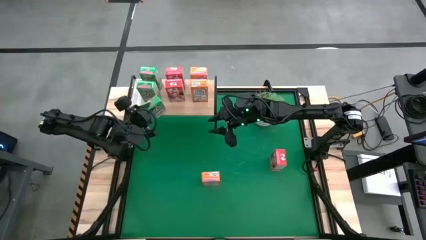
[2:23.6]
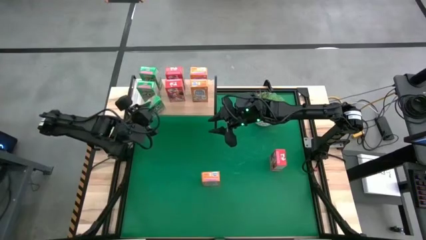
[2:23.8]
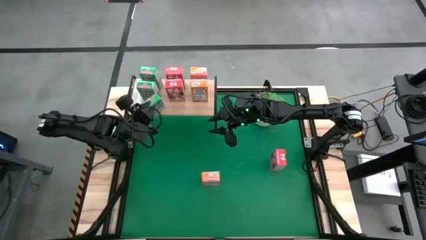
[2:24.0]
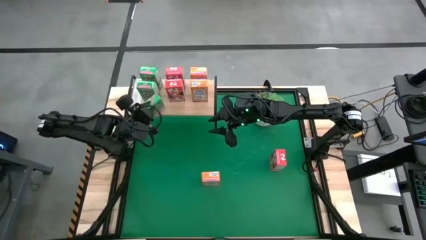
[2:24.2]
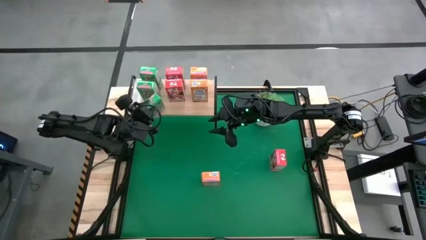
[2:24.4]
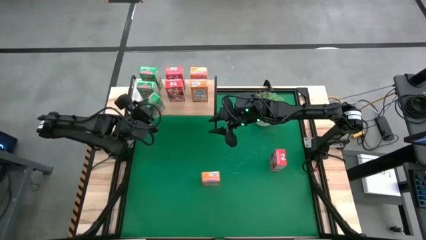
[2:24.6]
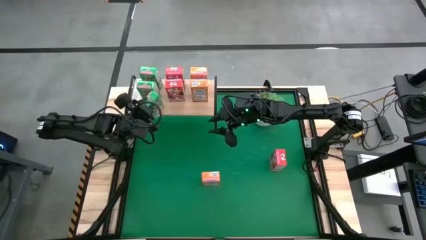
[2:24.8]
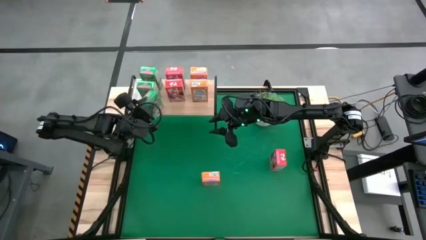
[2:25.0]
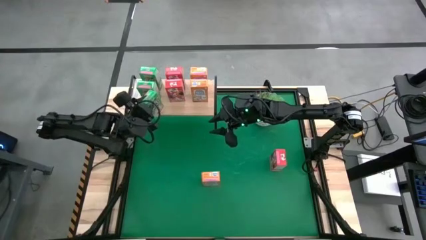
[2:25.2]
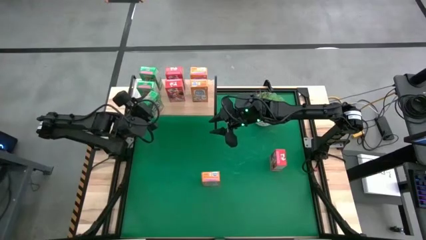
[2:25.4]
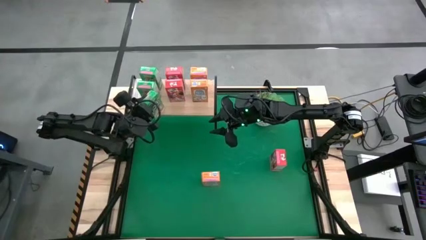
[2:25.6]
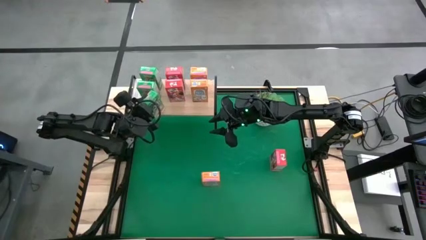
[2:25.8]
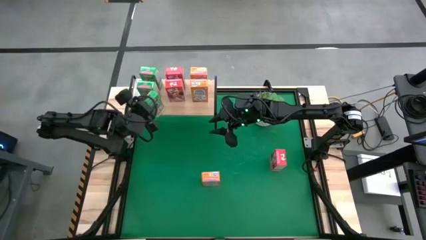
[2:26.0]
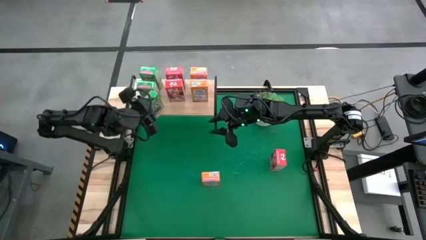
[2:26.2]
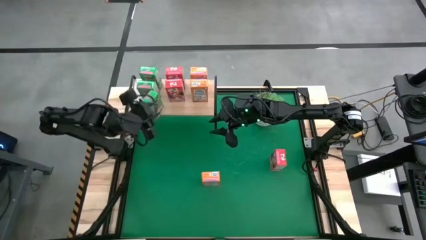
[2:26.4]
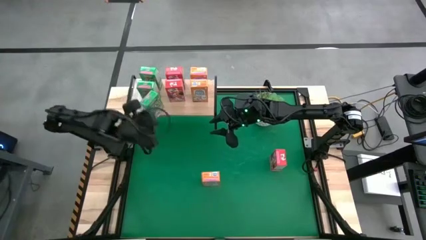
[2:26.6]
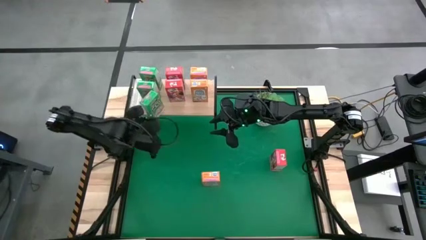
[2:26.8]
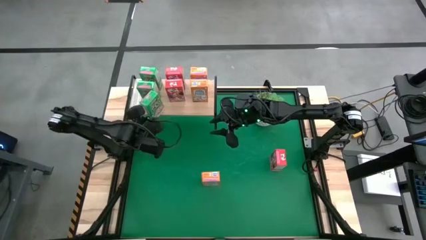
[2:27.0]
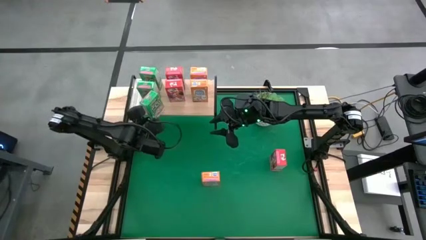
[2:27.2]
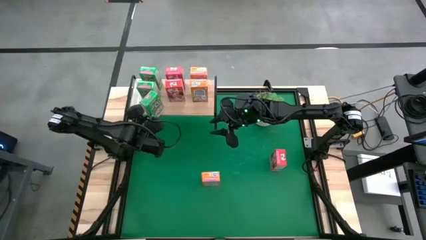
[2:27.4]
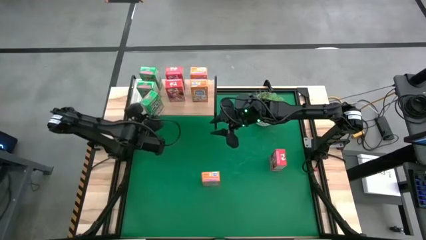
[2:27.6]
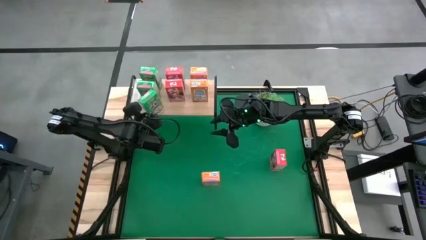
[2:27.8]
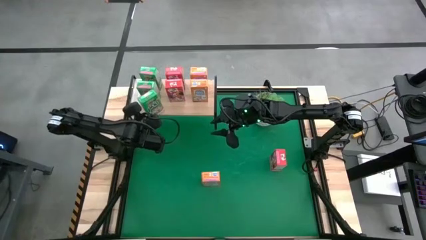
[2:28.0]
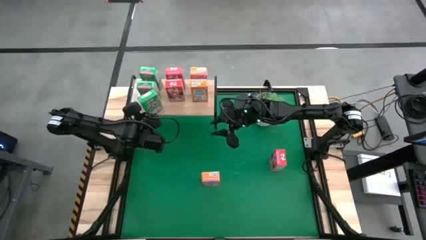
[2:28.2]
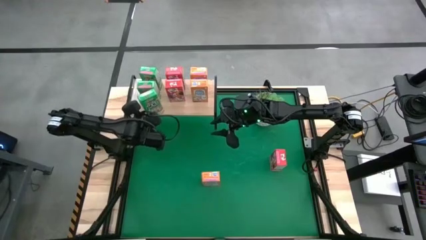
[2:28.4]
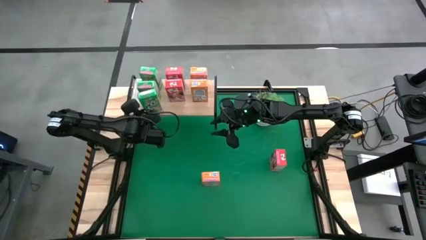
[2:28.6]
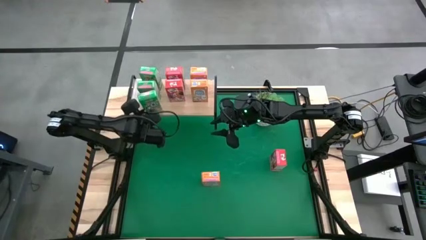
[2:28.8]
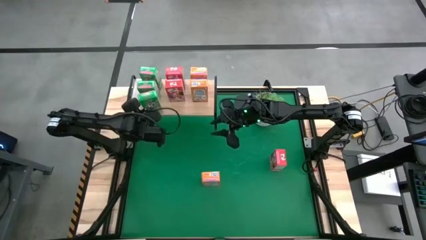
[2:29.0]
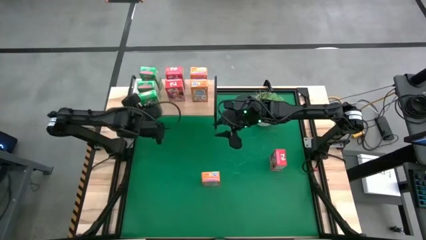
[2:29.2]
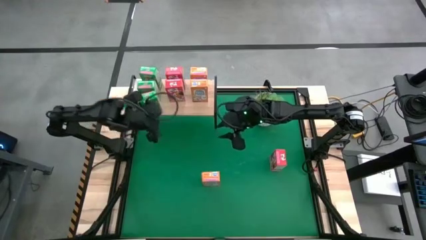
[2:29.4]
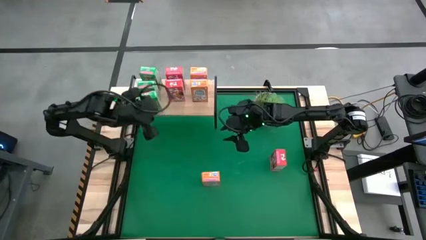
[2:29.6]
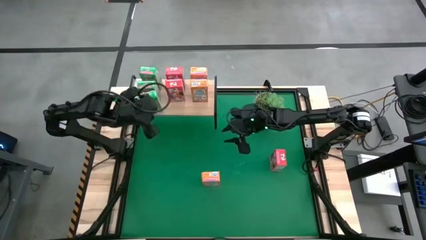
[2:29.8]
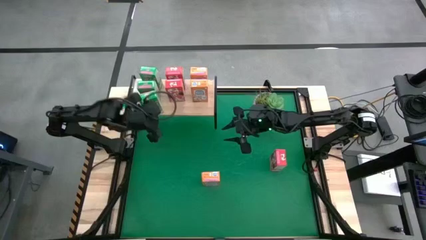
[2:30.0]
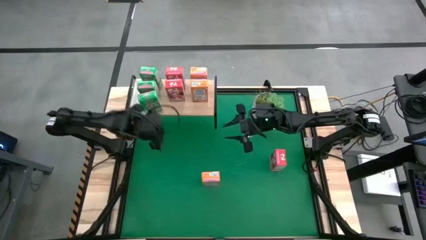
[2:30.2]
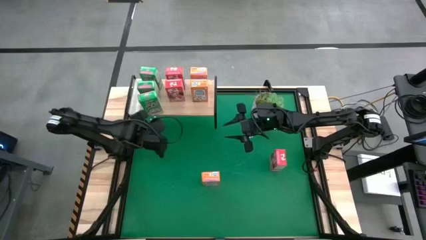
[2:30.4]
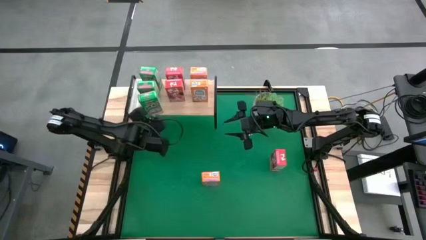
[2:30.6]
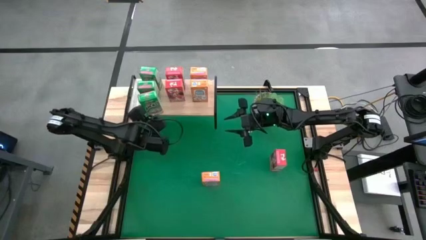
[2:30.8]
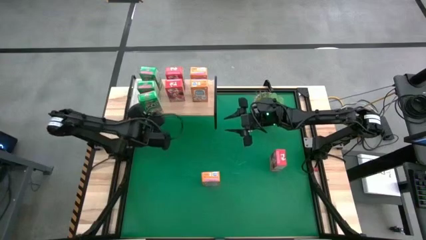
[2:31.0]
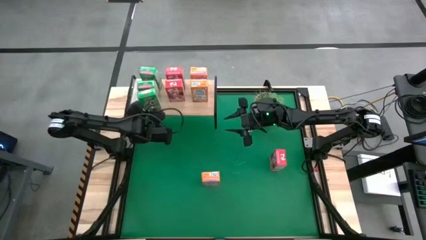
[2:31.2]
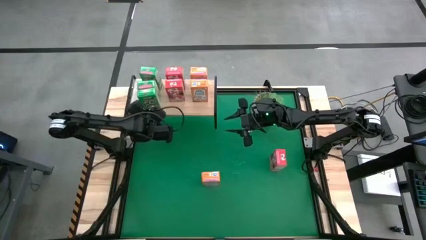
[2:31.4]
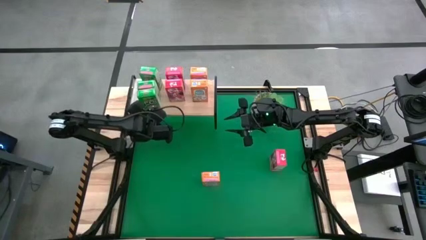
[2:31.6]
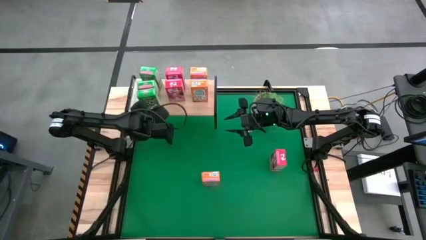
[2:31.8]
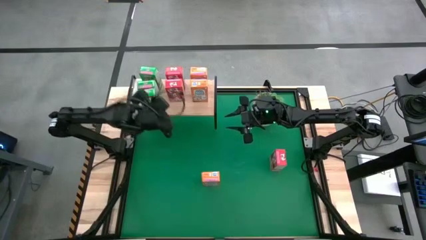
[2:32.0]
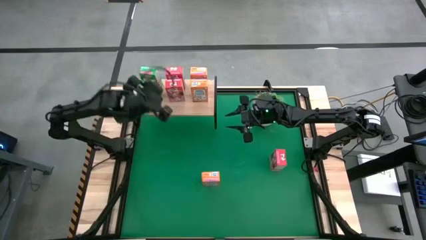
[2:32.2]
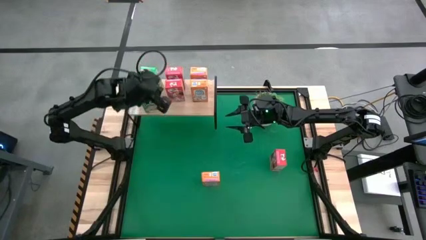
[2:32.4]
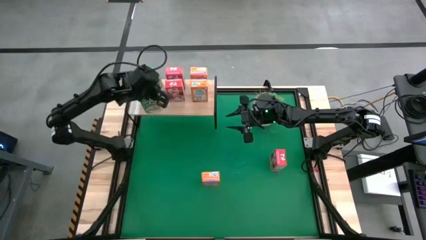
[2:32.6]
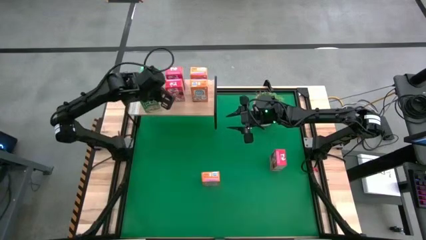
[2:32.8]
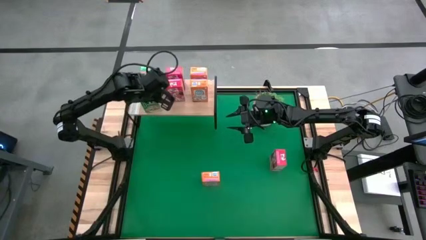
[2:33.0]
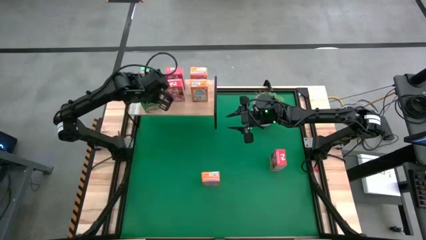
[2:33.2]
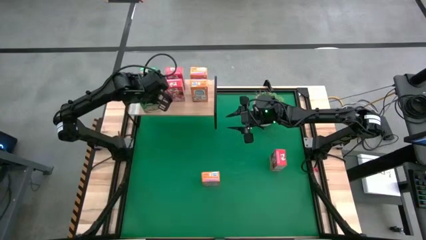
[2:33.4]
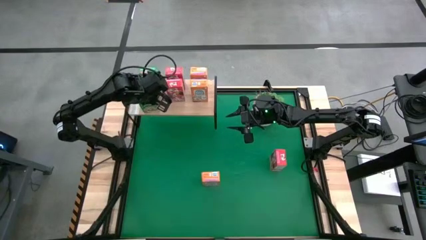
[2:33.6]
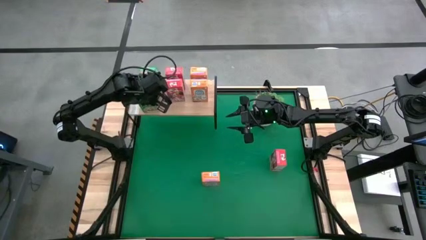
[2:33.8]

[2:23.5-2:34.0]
Task: Stack cereal on shelf
Put the green cereal box on the shelf aligned with other green cereal boxes

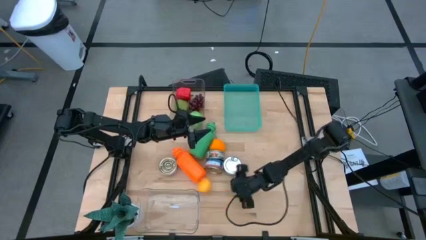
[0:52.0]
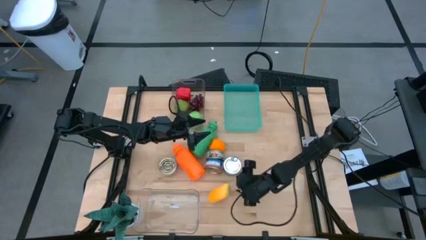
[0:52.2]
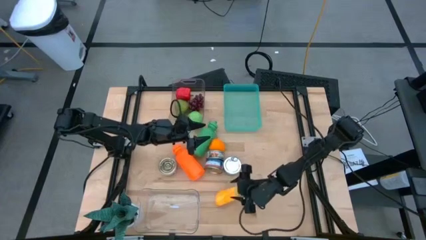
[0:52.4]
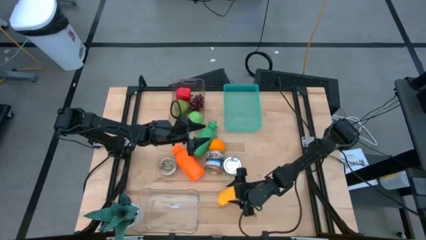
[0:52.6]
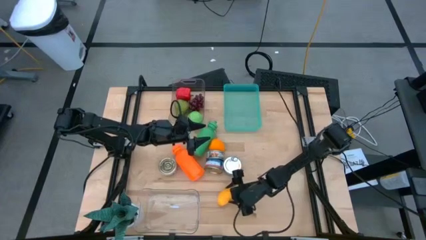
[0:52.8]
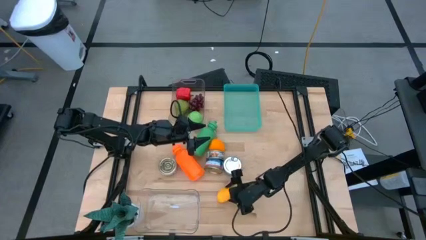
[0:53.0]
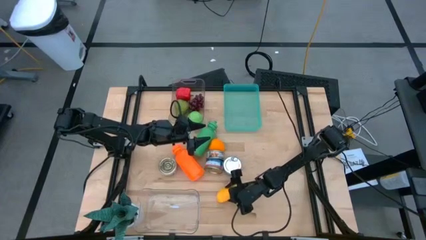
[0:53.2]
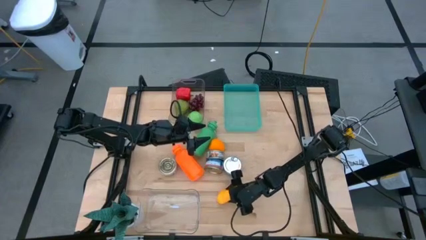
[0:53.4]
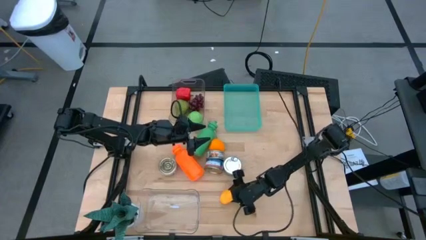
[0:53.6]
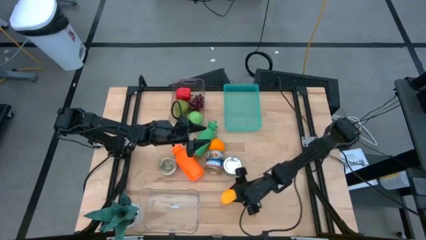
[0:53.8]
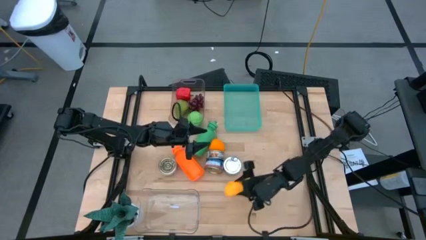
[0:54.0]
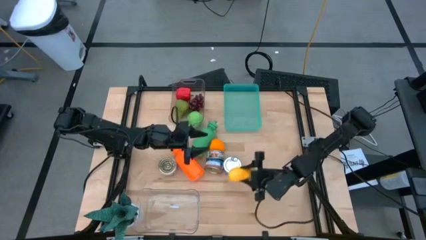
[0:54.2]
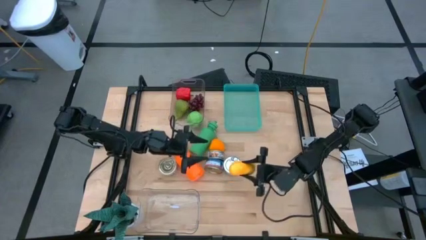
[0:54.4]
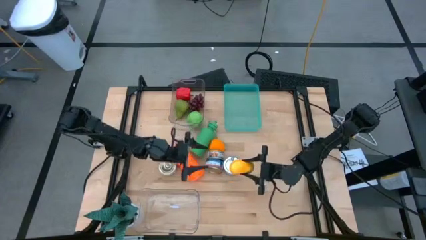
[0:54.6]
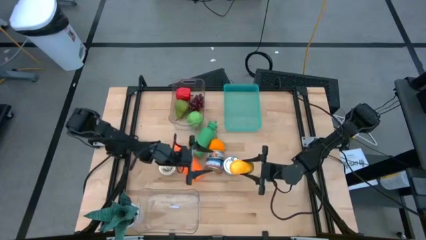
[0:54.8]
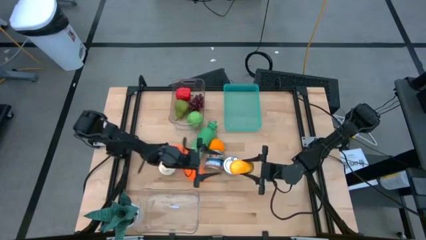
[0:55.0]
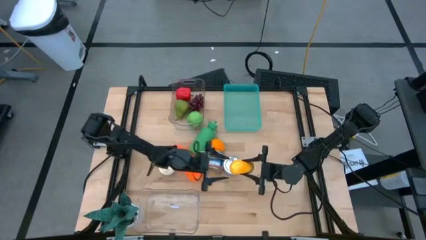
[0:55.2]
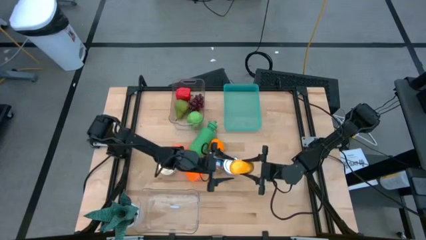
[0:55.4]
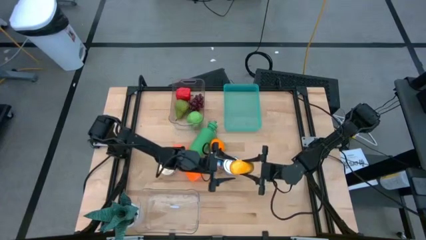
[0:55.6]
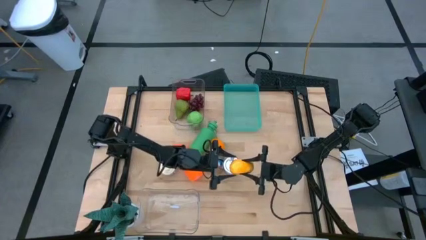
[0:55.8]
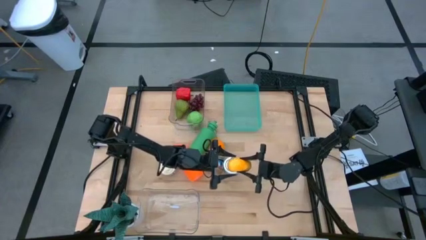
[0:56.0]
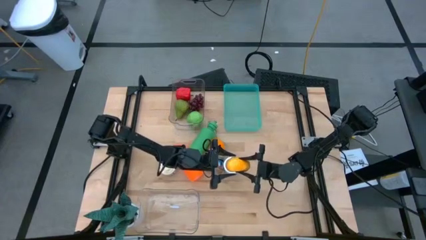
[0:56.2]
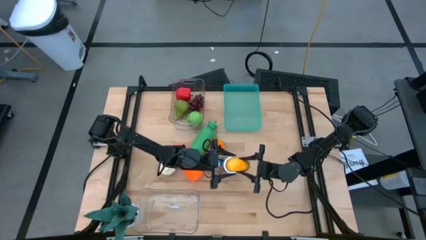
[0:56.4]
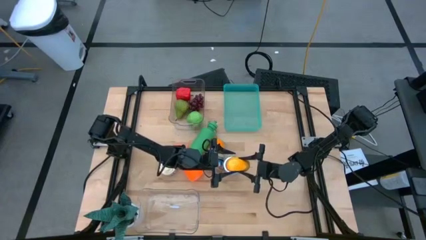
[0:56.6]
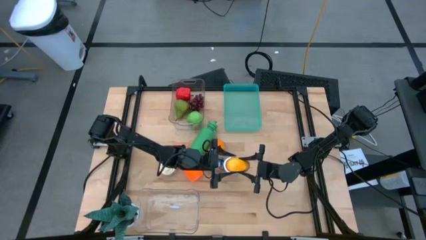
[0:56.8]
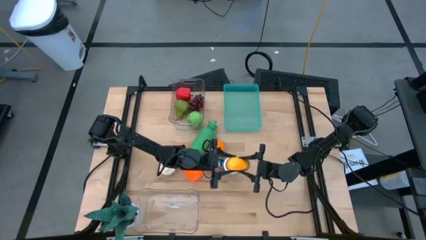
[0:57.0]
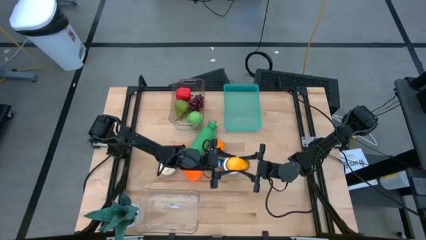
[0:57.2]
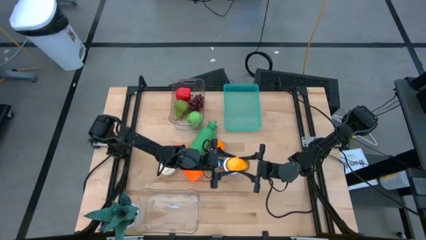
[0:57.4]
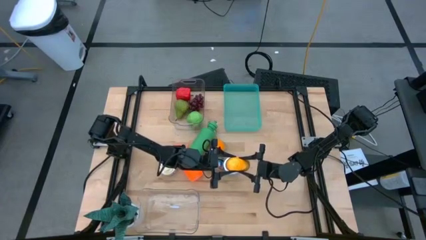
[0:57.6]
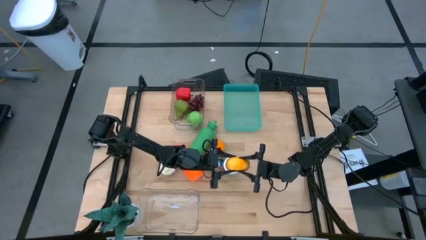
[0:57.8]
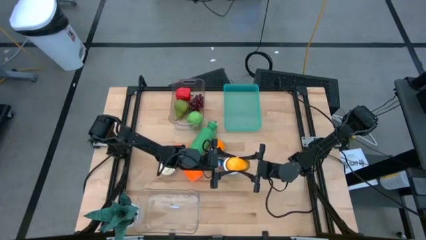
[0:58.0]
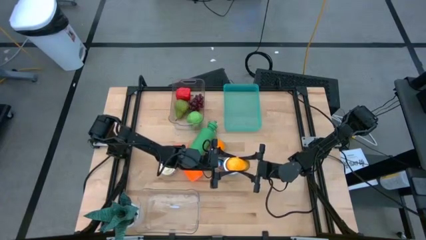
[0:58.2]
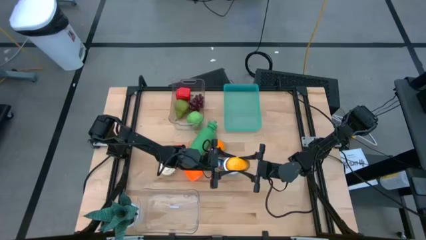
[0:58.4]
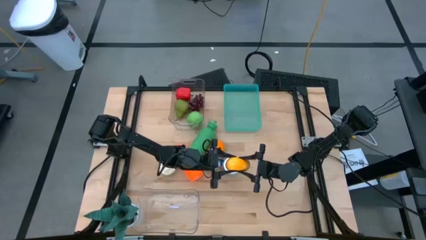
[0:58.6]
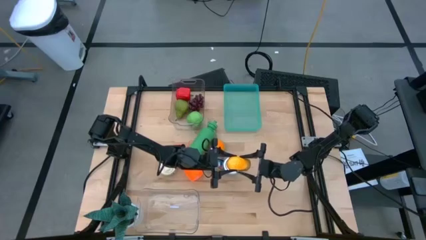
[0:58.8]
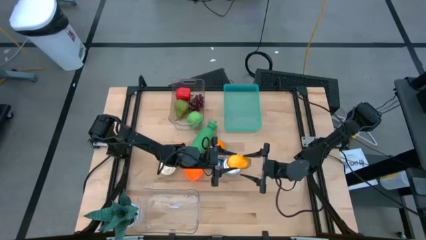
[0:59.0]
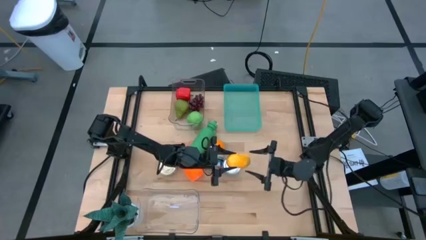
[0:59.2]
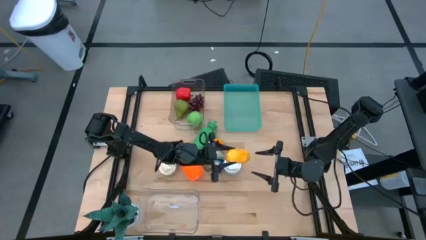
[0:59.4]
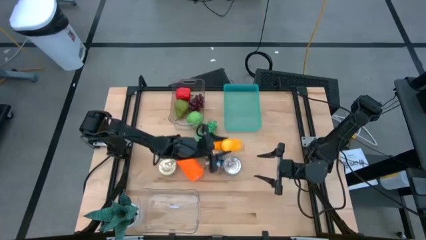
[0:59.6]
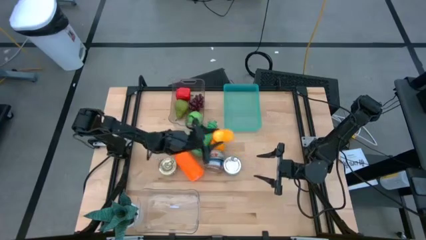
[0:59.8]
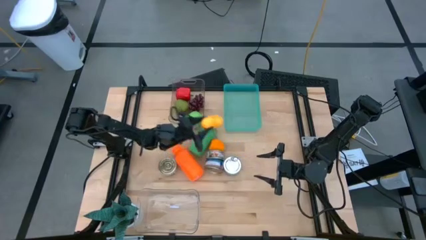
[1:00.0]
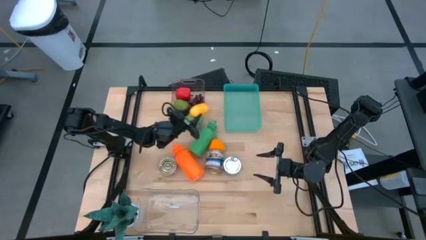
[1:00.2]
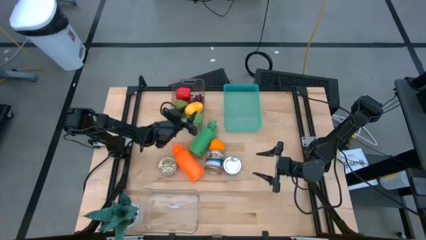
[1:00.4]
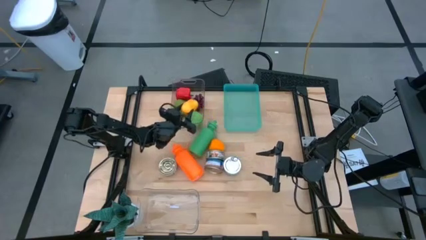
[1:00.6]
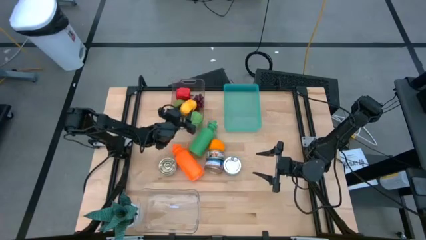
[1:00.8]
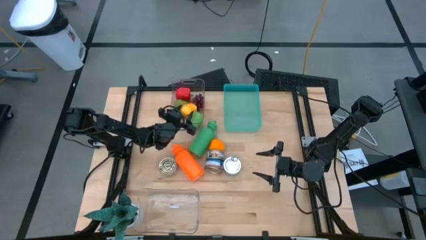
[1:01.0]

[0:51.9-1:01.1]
Task: Pick & Place Food Item
Put the yellow mango into the top transparent bin
